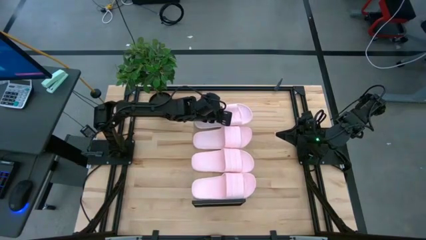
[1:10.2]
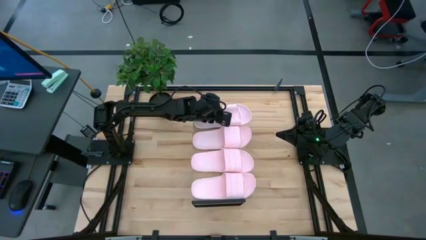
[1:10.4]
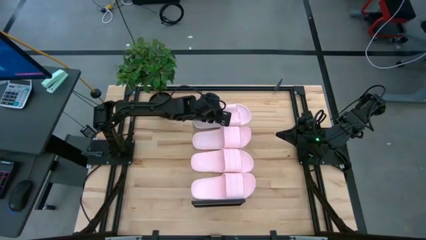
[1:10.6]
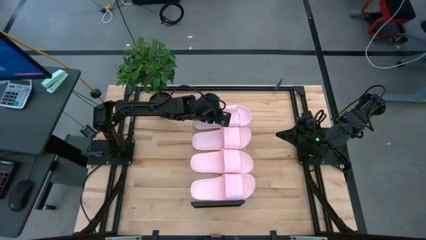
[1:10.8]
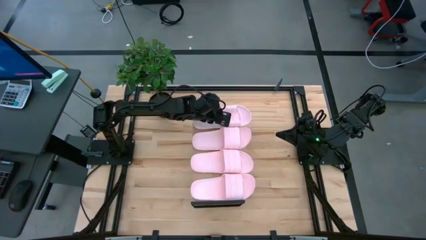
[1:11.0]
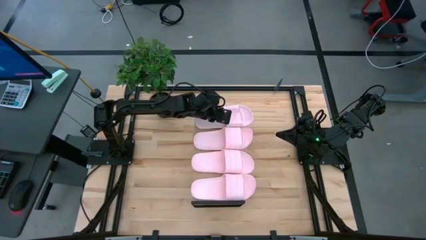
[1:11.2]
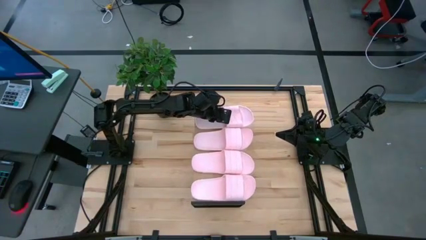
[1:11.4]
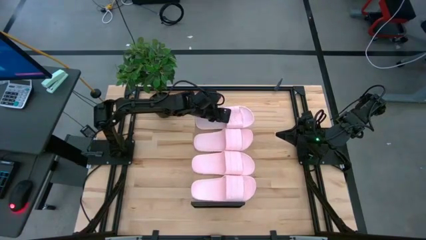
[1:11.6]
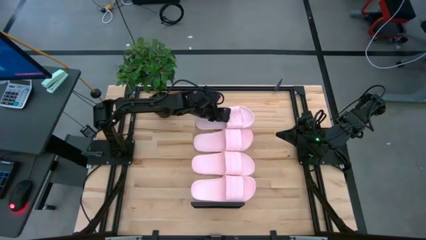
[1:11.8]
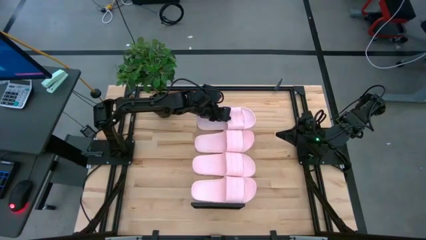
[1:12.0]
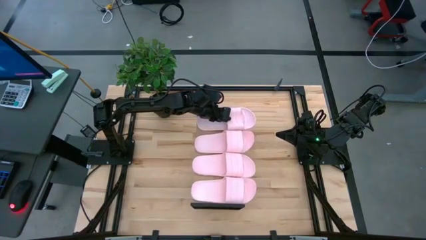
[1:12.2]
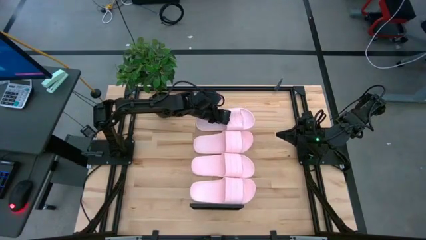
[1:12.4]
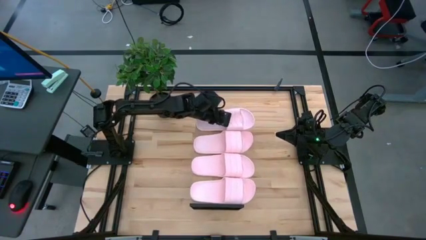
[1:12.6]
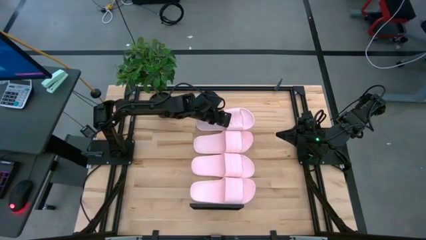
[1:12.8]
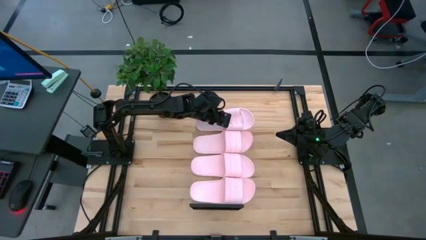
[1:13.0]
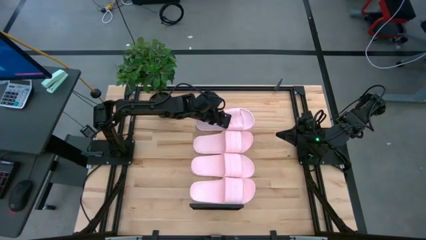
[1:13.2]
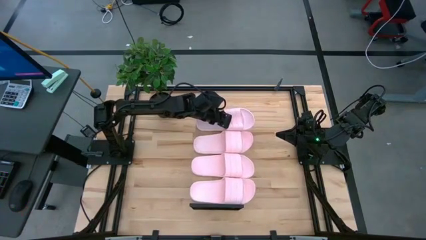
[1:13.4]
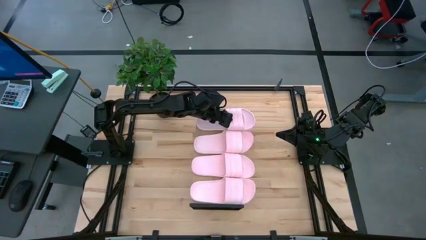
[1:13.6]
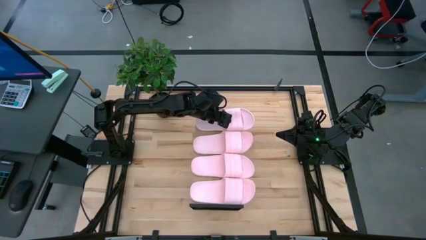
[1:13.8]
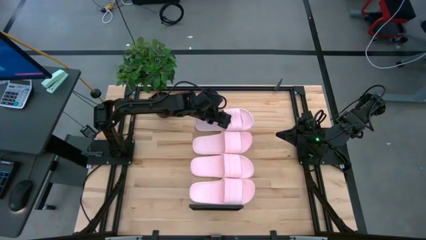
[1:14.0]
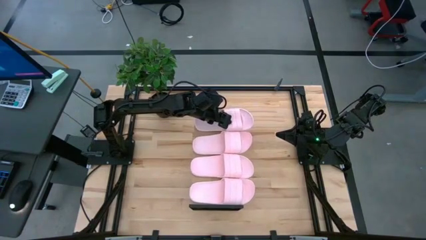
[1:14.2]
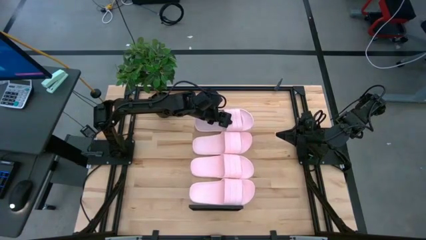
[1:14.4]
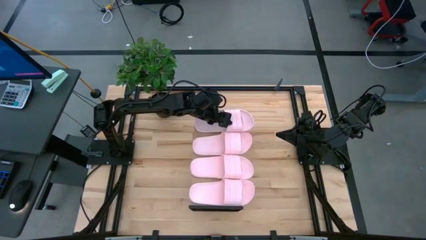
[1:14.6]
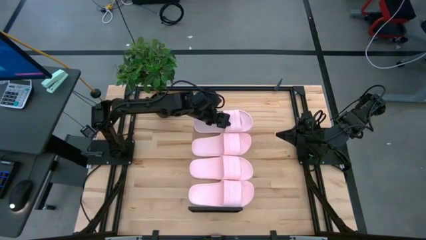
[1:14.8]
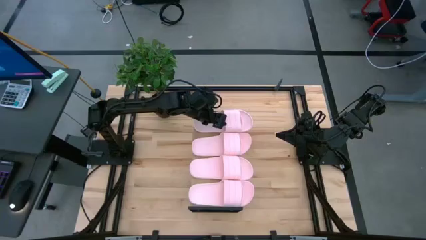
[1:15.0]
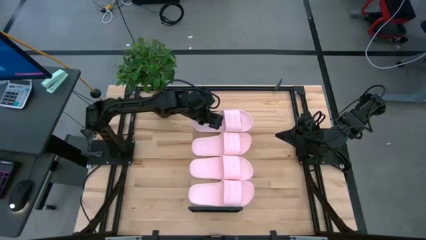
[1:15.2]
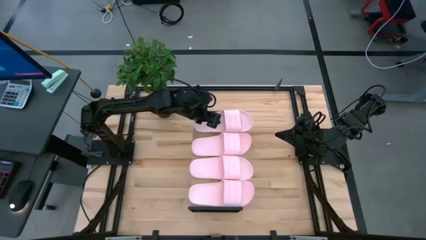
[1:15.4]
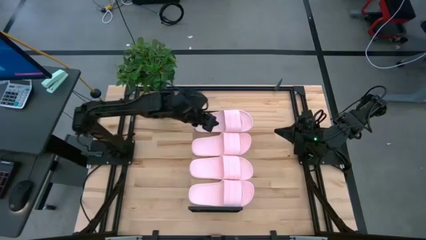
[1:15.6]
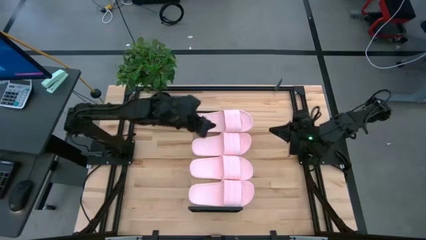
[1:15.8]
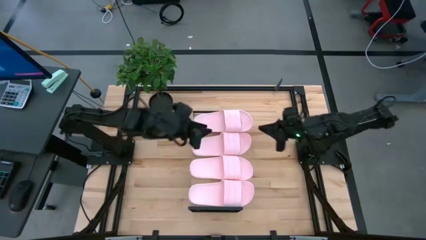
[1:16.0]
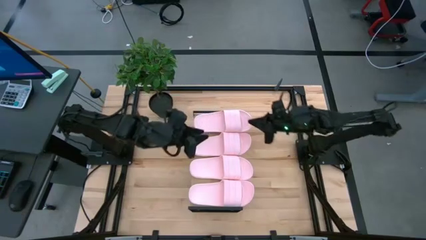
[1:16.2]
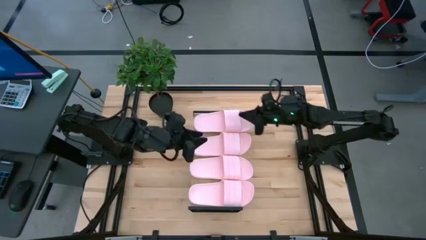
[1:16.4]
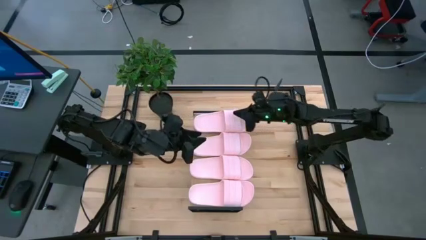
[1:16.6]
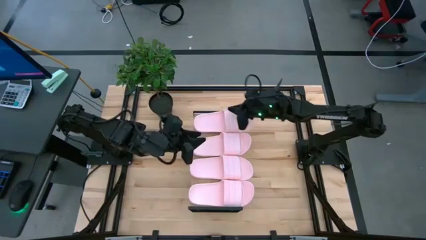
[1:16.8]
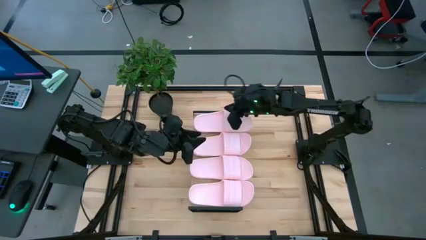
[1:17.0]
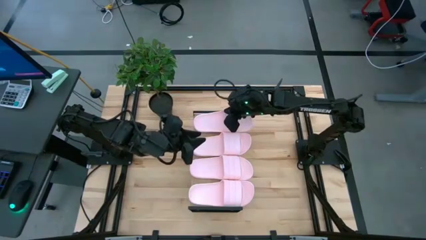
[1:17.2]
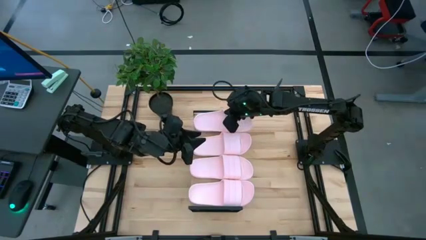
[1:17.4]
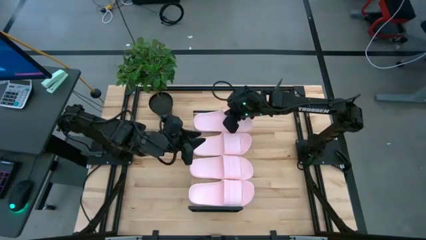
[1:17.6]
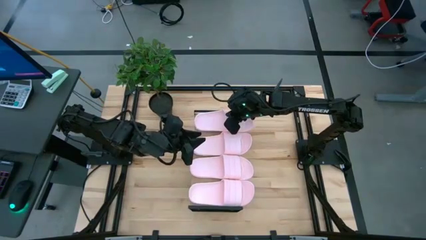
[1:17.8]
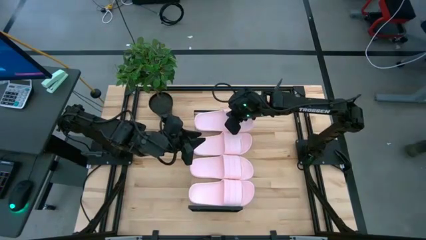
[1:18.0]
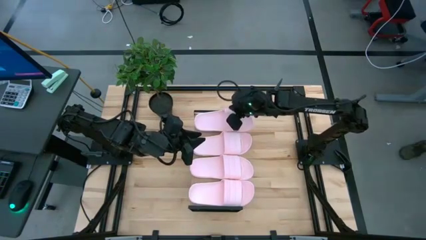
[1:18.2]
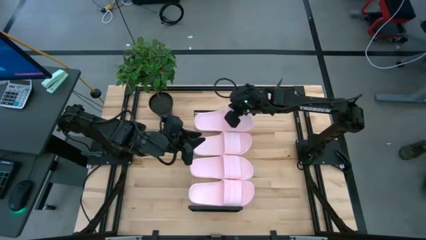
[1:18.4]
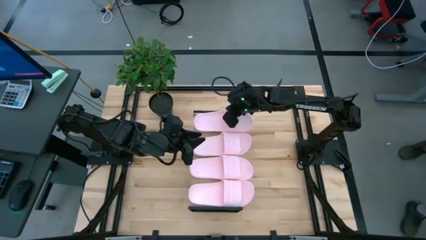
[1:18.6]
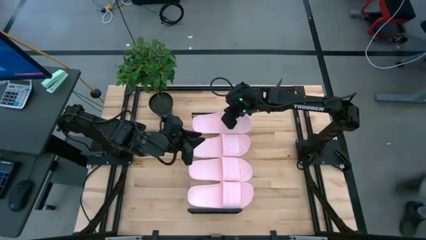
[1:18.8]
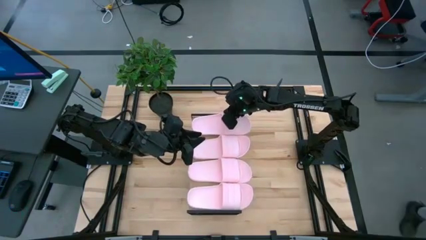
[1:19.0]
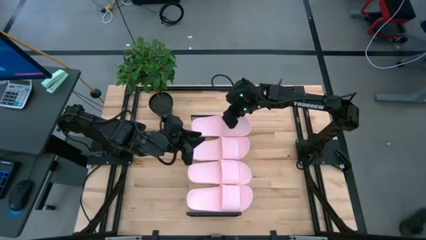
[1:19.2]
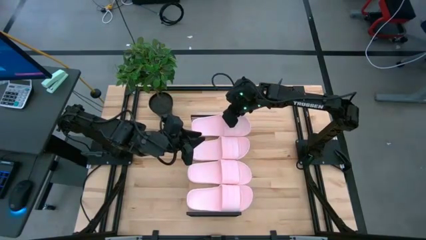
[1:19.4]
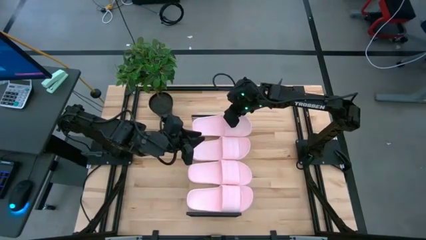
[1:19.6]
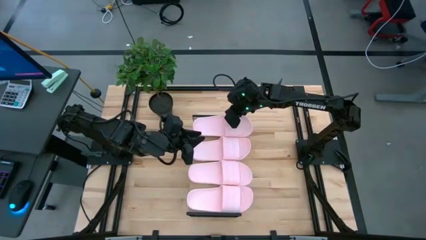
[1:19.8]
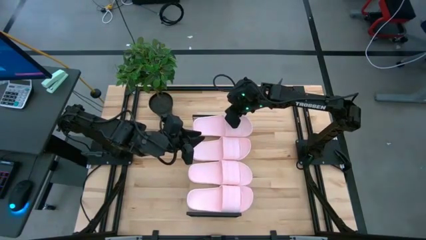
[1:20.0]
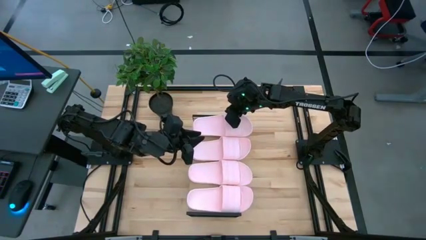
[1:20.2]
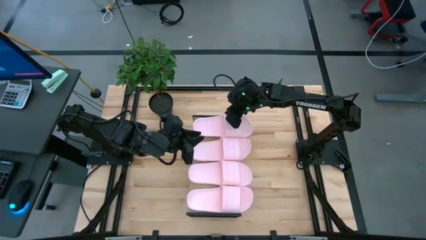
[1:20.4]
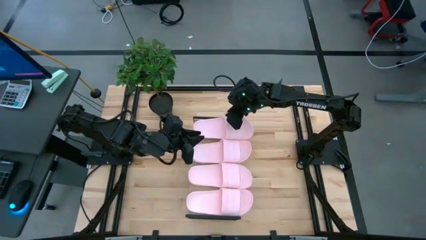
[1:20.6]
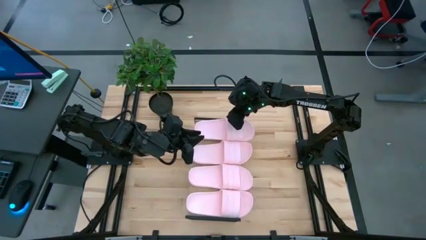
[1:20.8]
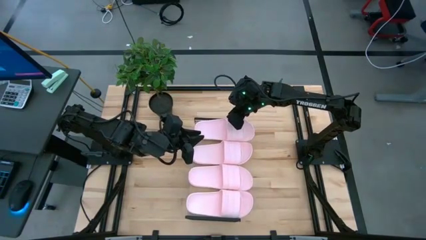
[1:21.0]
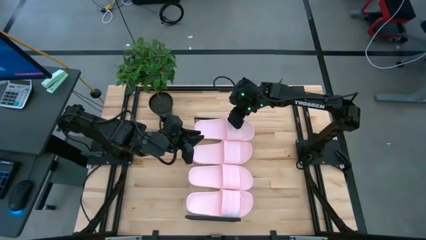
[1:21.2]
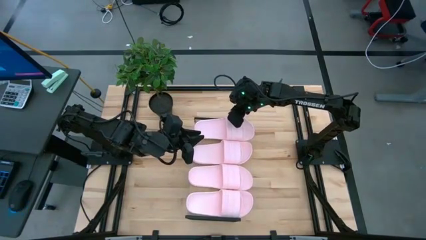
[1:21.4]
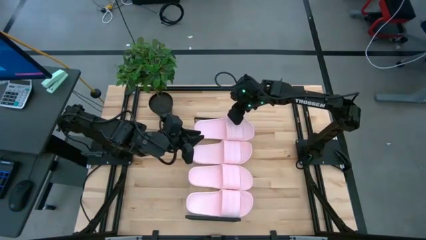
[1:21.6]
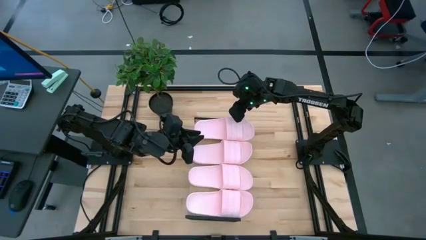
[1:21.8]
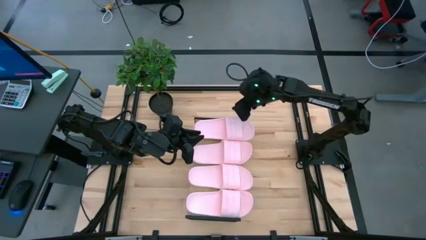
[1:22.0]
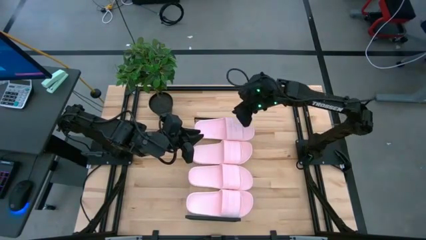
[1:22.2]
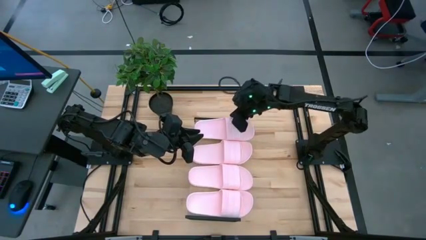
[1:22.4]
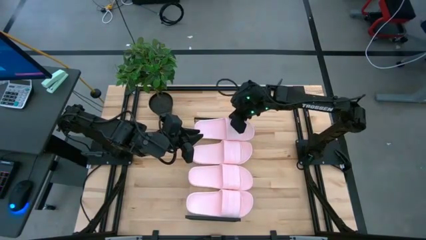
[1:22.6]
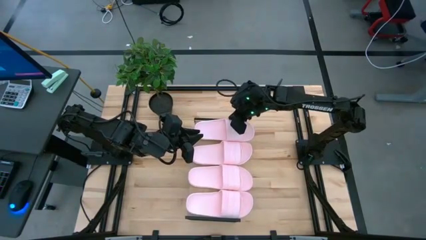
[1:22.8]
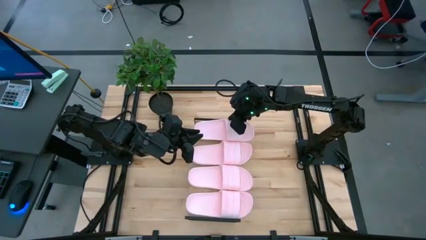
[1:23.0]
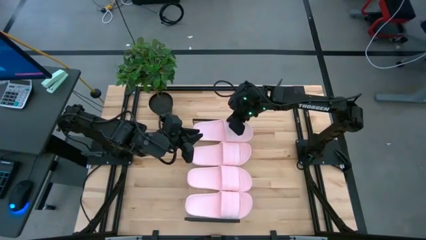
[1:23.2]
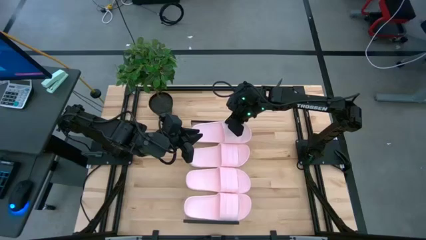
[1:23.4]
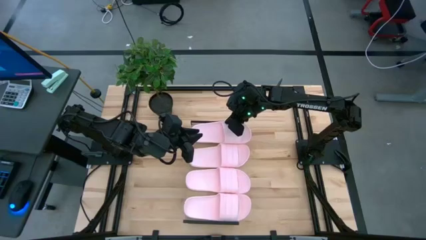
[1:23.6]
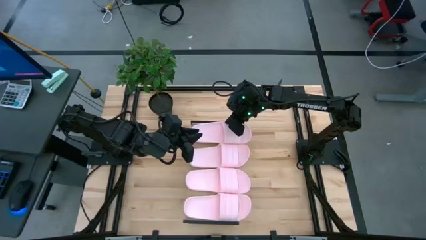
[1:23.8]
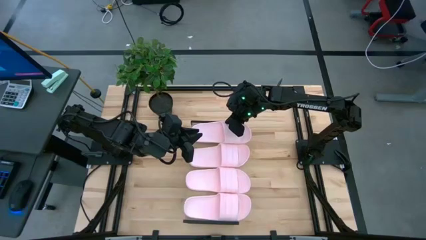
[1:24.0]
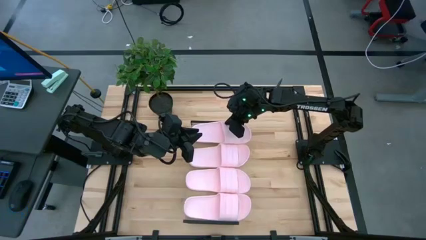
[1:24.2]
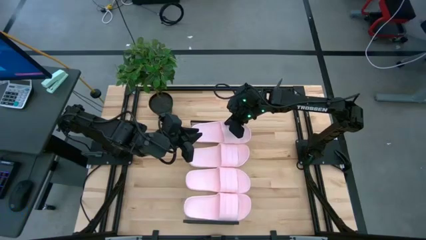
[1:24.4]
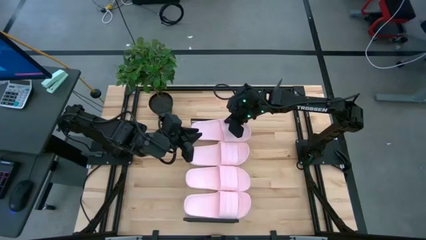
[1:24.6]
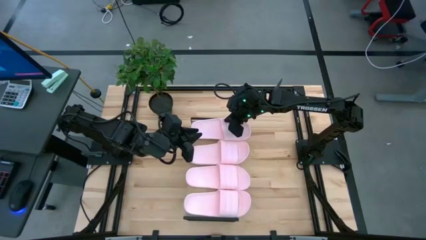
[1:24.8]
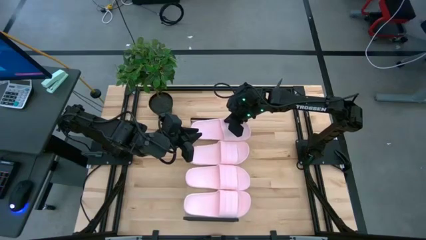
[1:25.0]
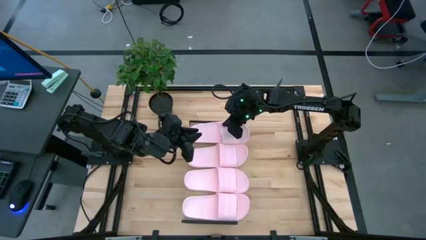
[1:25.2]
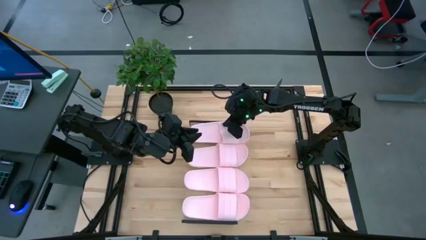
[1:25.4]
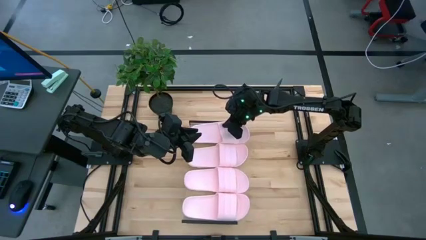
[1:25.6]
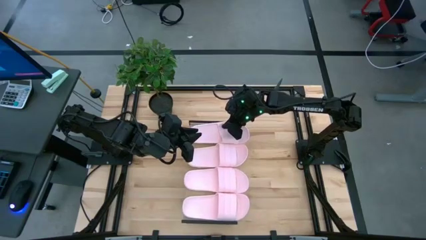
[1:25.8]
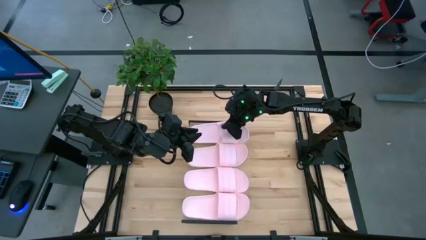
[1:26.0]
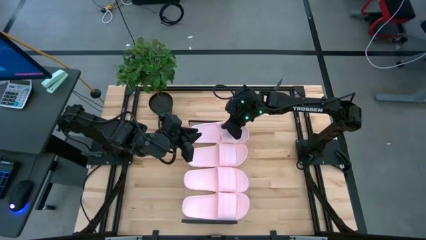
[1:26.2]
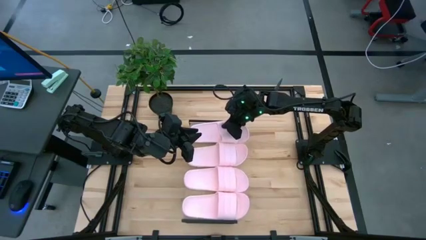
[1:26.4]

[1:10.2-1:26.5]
Task: Pick and place slides into the shelf
Put the pink slipper on the shelf

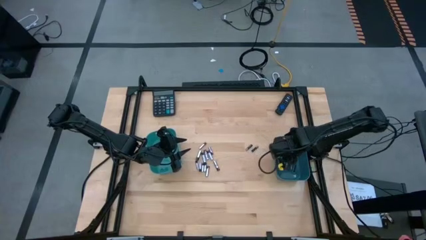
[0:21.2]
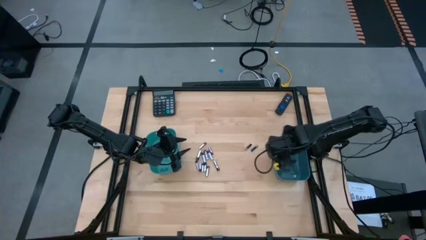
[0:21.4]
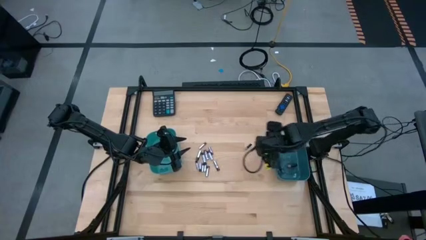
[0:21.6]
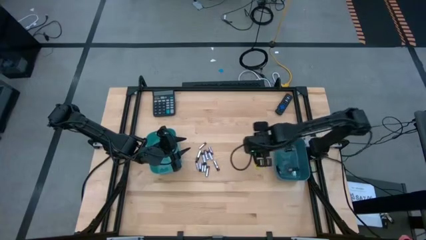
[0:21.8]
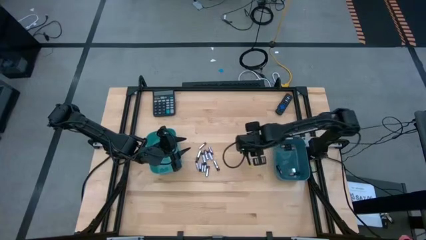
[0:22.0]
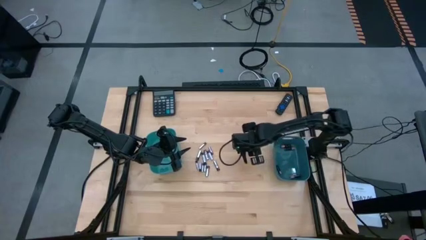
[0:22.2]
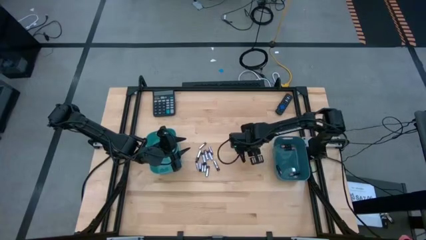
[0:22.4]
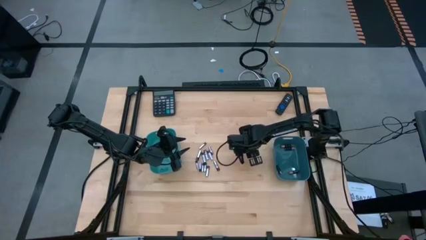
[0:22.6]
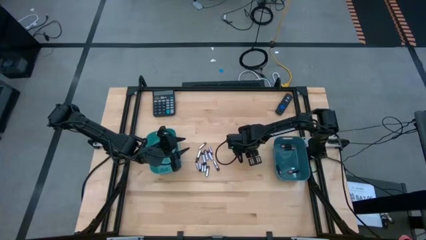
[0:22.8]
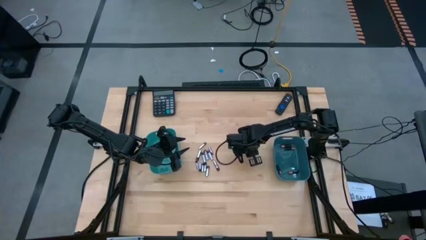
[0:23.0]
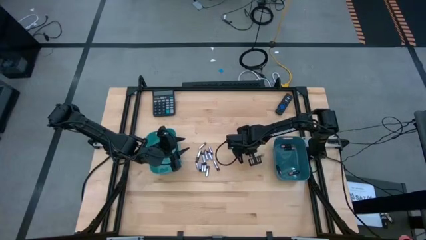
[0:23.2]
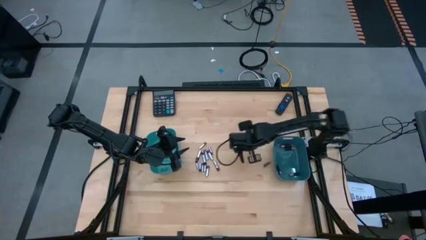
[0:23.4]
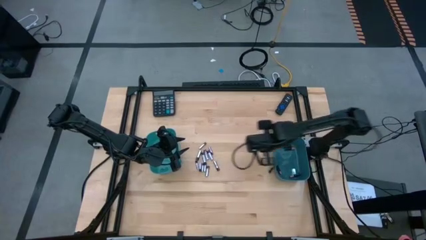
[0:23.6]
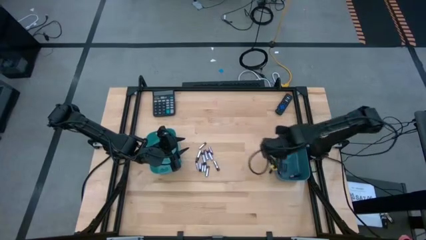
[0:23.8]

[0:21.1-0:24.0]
Task: Sort batteries
Put the black battery into the right blue bin
